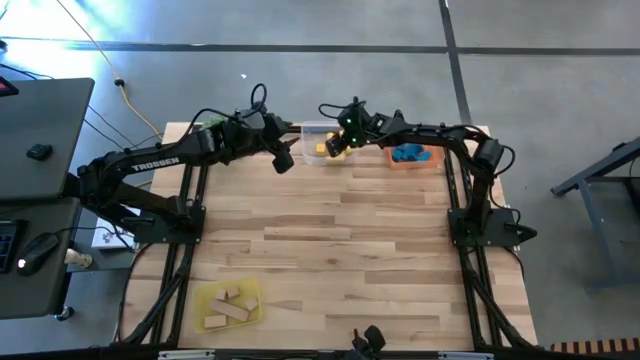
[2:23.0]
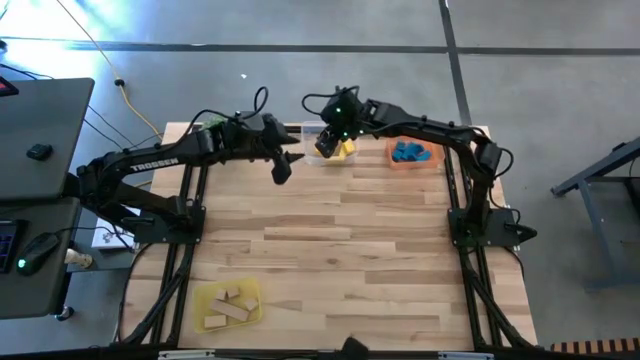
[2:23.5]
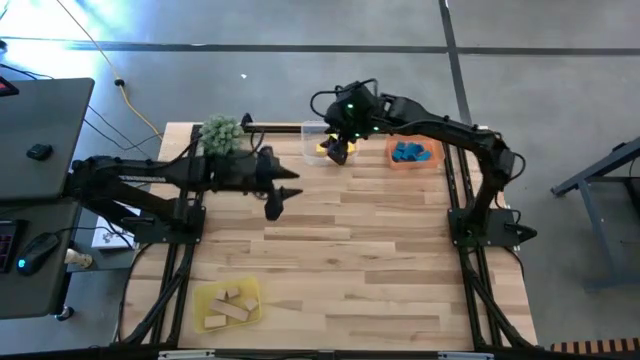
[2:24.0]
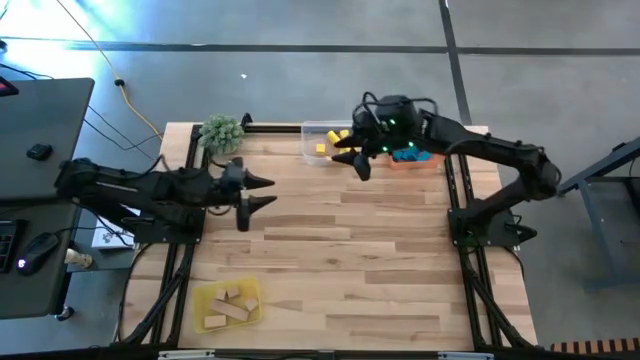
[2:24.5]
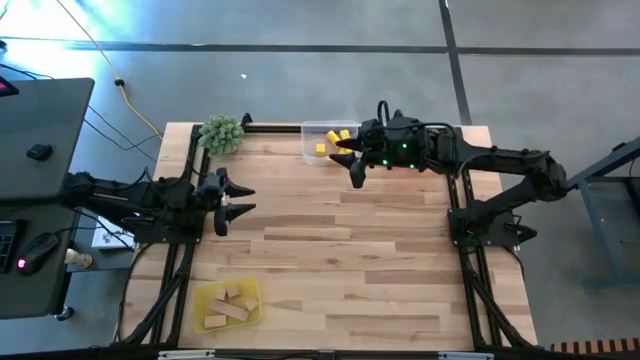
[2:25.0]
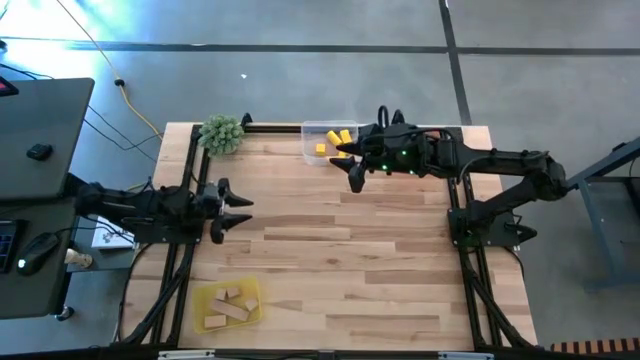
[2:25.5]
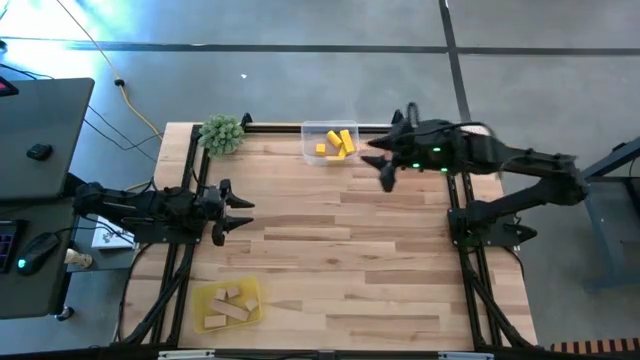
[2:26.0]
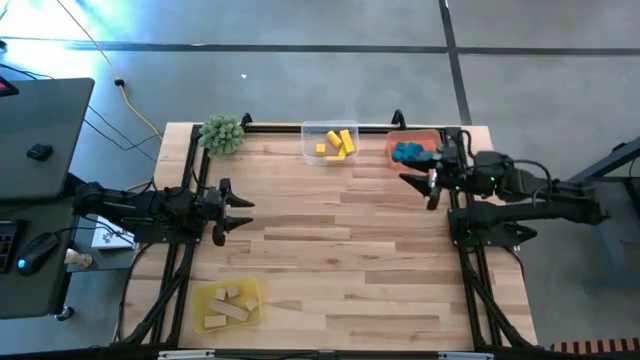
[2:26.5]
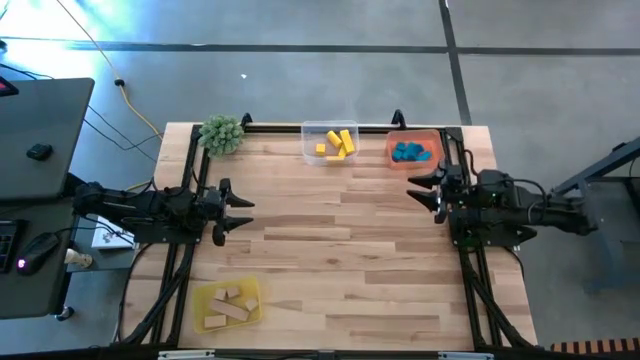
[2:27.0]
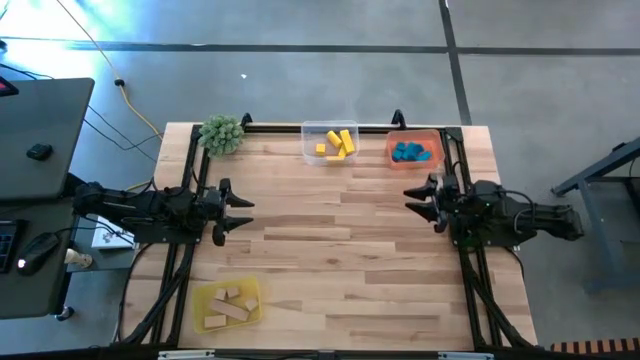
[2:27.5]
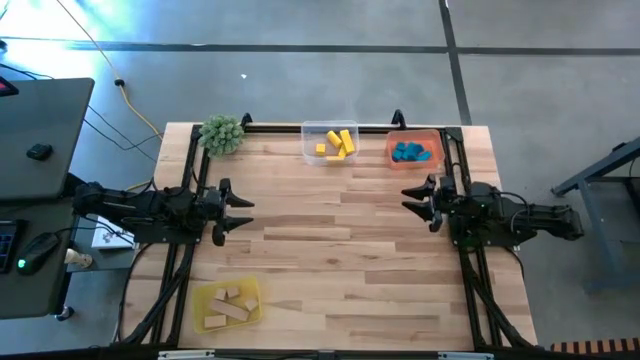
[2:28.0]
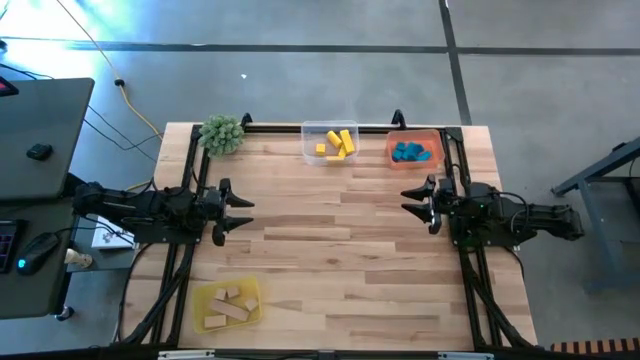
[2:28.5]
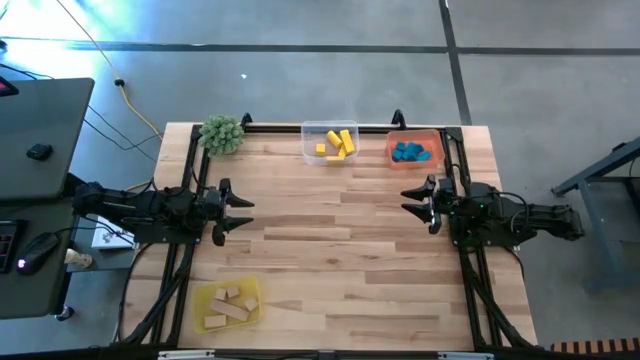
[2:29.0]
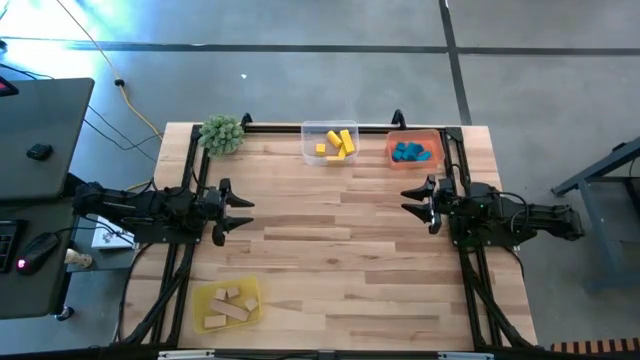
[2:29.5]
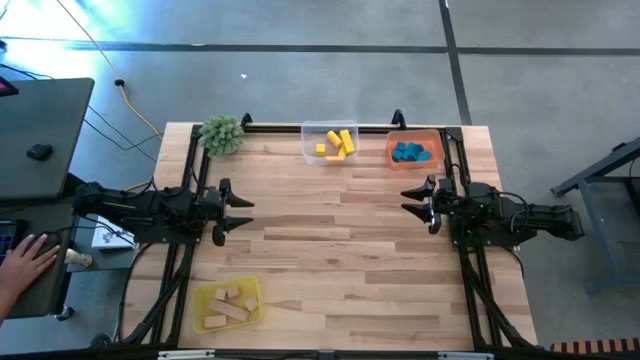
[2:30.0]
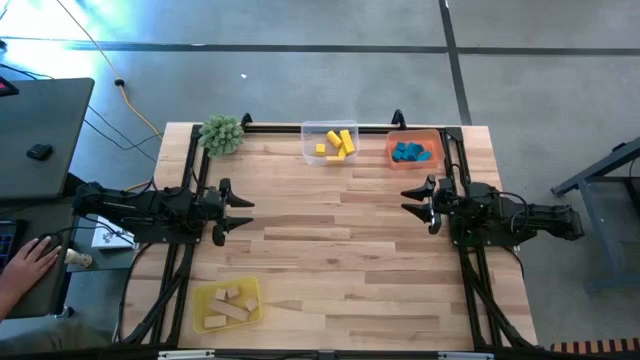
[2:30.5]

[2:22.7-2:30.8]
Task: Sort & place blocks by color
Return to Home Position

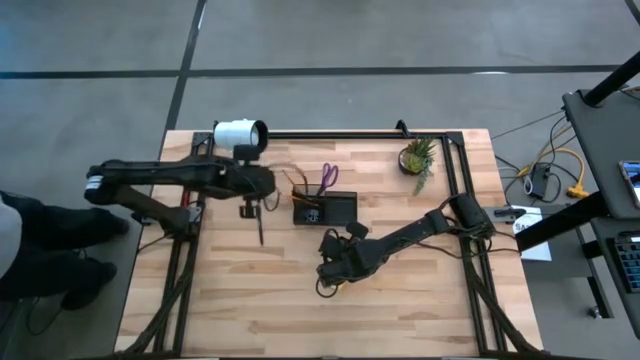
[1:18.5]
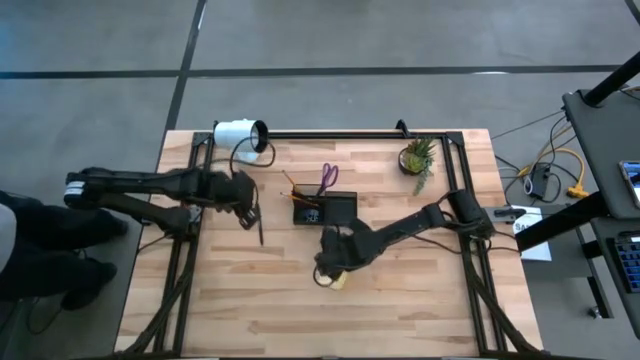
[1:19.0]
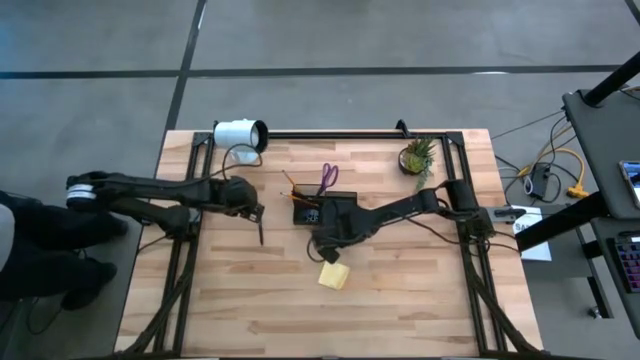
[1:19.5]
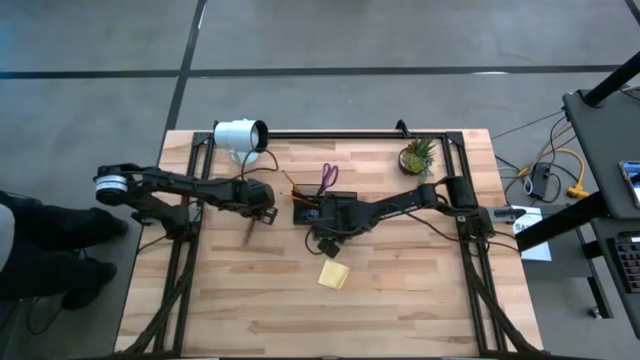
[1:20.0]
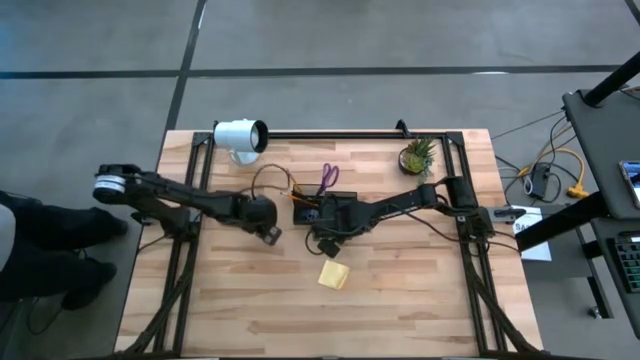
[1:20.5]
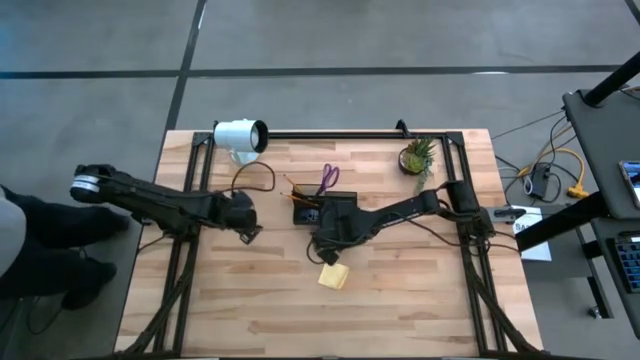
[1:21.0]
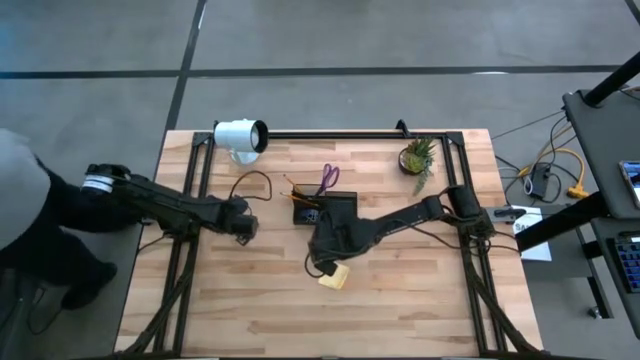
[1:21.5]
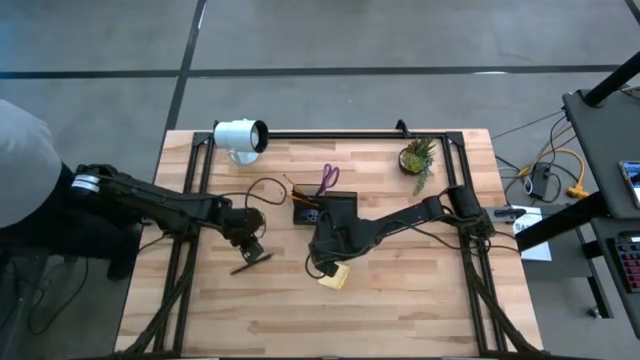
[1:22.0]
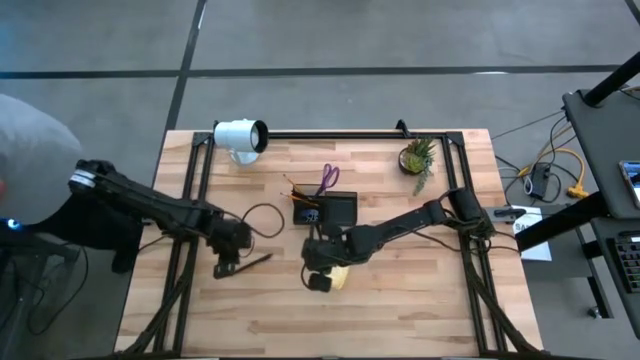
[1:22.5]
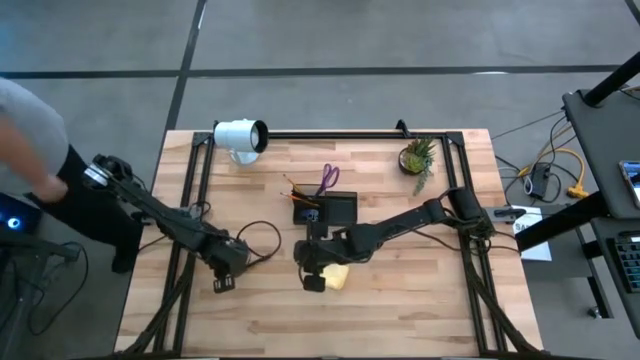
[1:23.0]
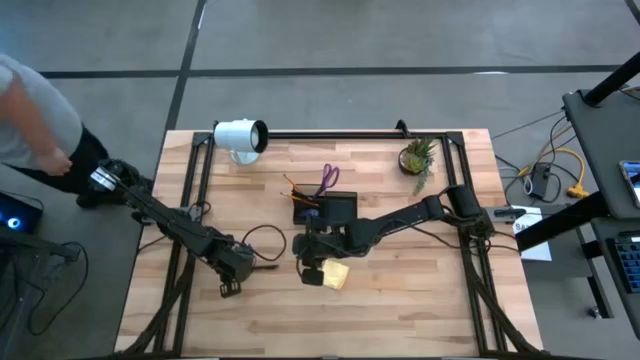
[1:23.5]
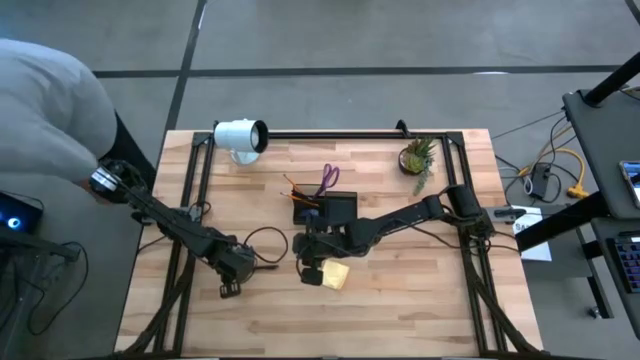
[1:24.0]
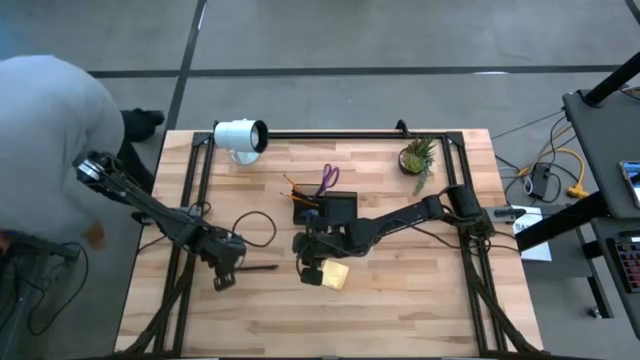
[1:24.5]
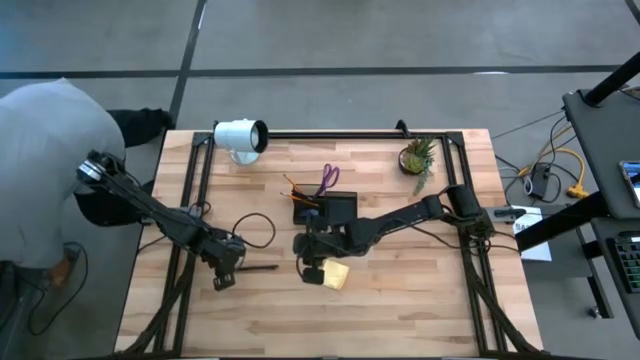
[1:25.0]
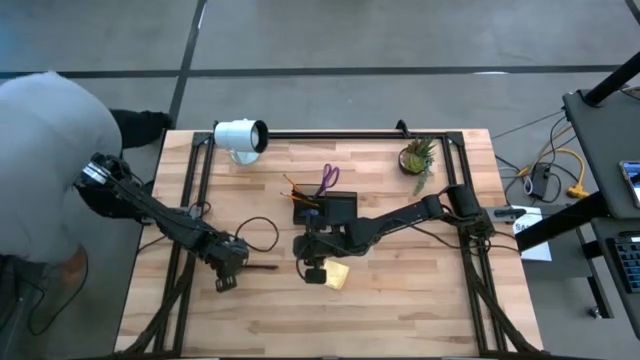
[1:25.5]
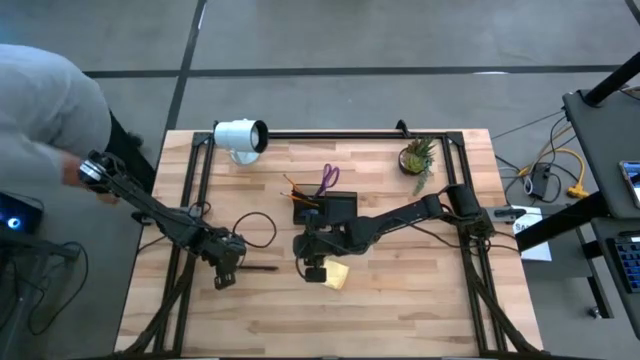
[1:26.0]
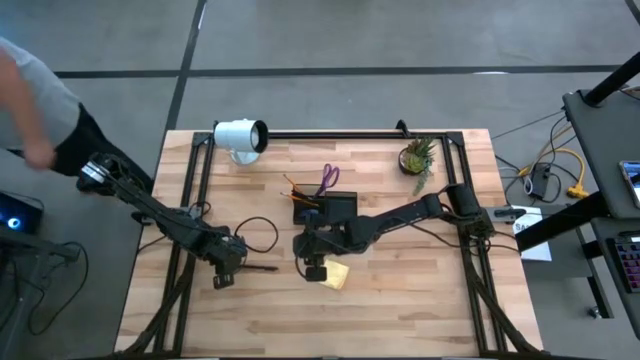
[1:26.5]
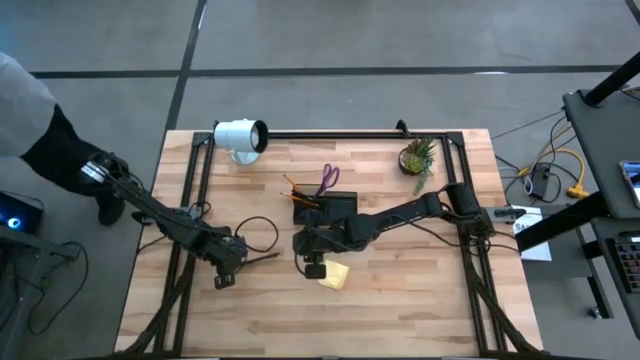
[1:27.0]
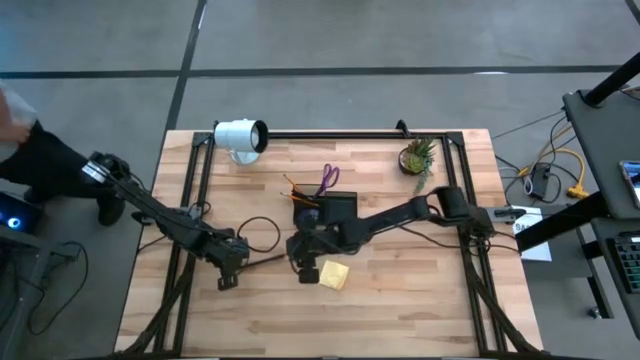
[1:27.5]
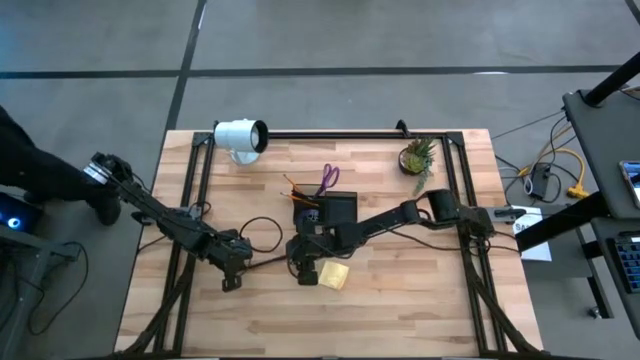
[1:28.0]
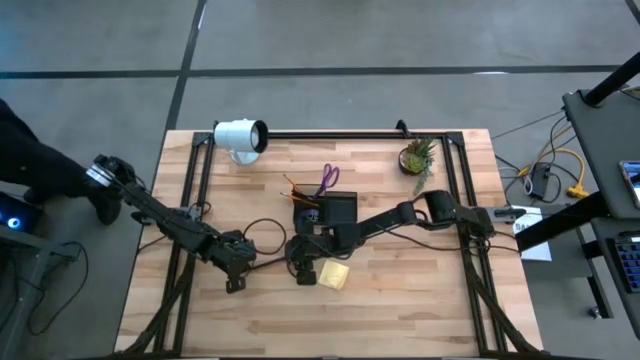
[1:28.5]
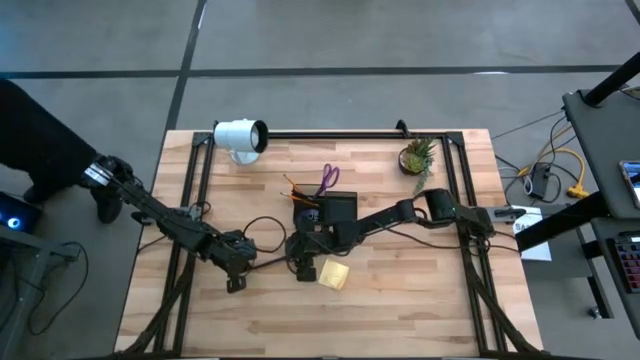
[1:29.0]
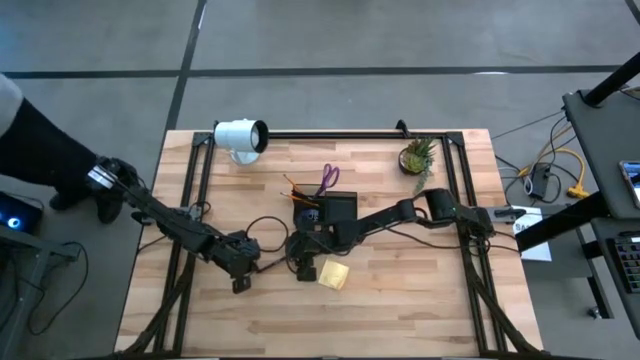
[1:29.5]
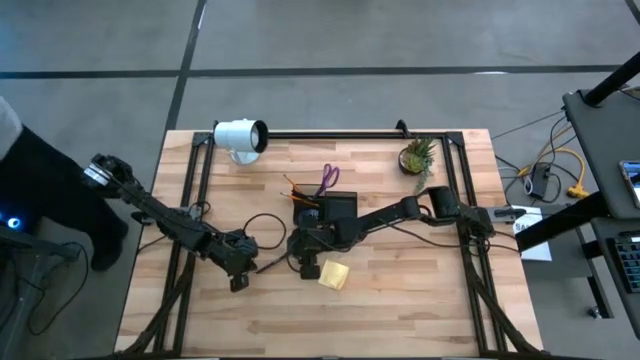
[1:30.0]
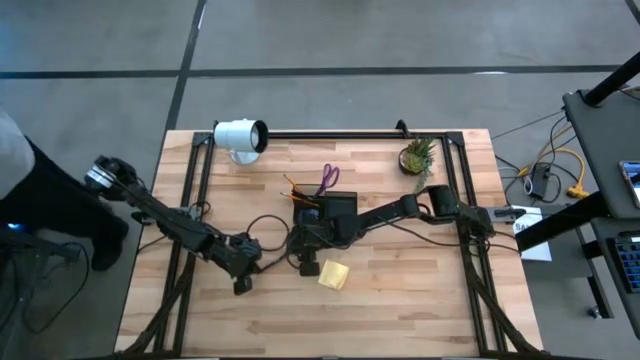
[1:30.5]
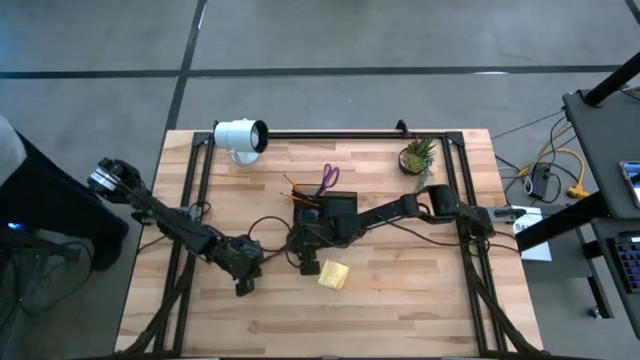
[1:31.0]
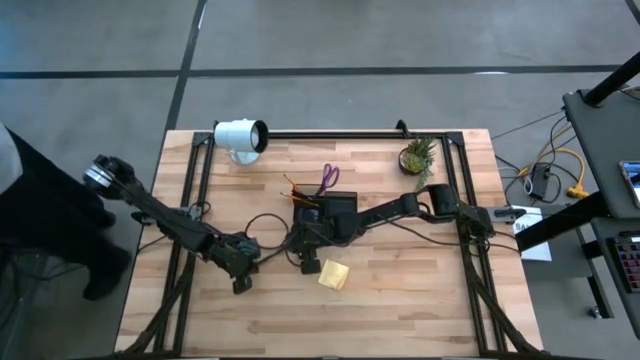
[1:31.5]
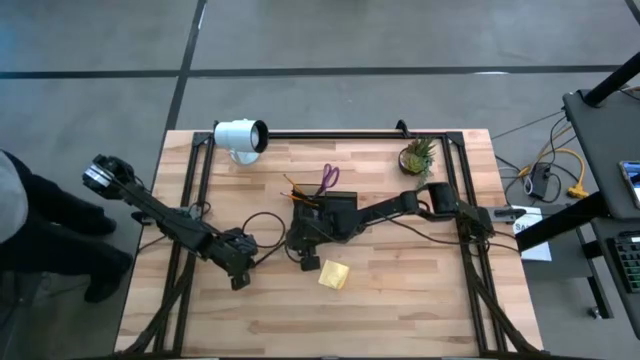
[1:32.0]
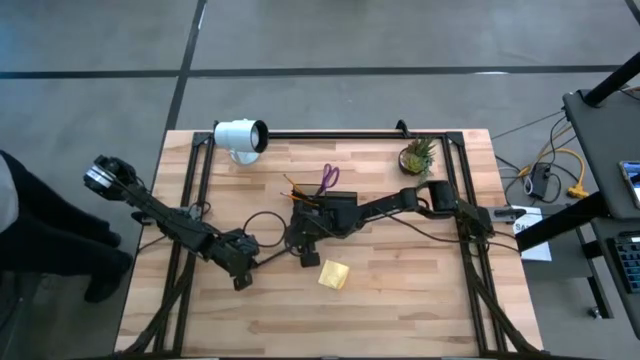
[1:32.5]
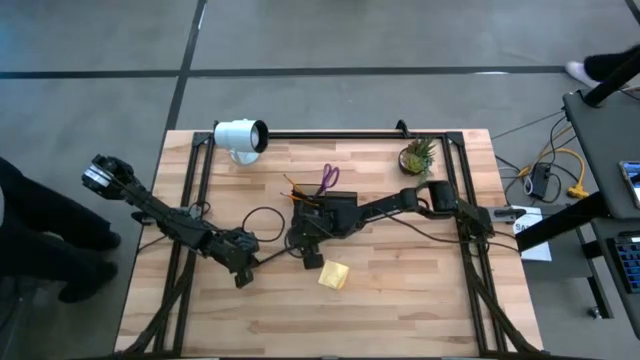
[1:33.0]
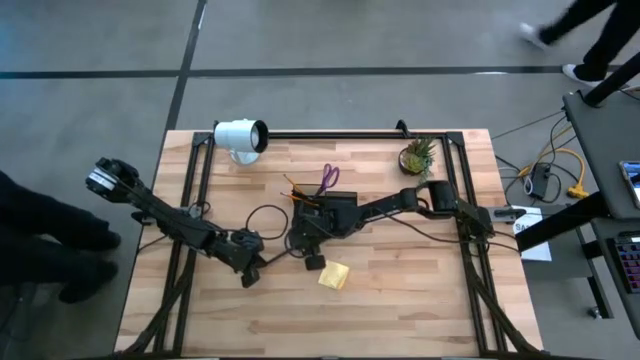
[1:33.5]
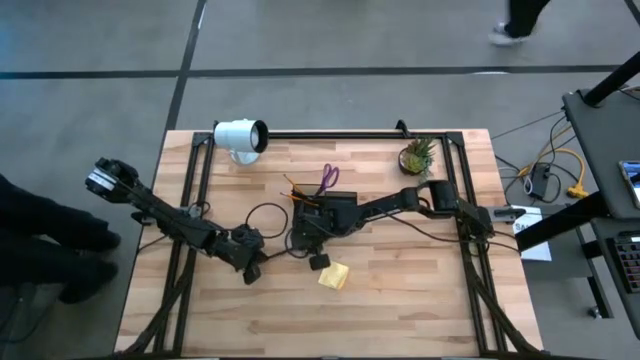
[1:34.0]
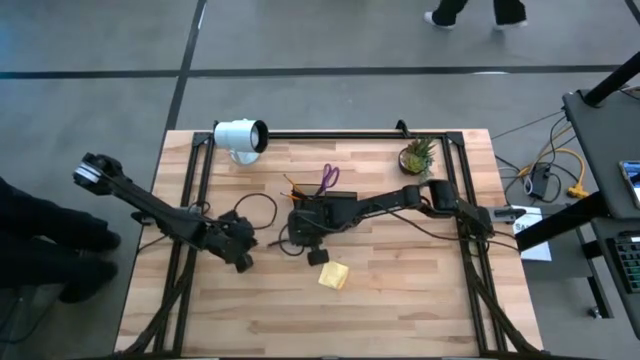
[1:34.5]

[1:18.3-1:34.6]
Task: Pick and place office supplies into organizer
Put the black pen into the black desk organizer
